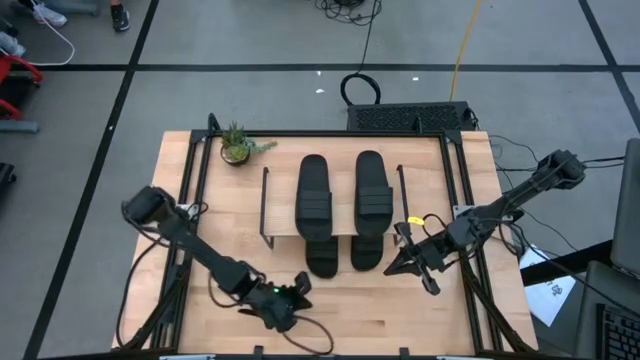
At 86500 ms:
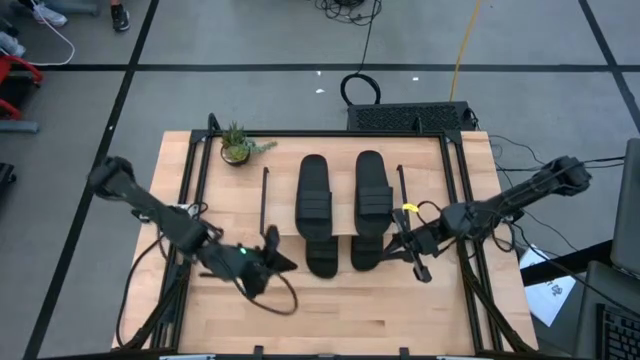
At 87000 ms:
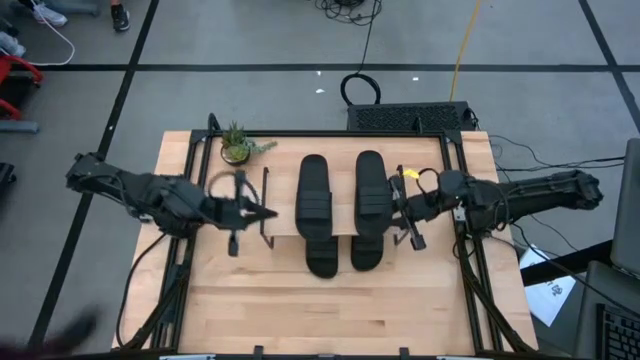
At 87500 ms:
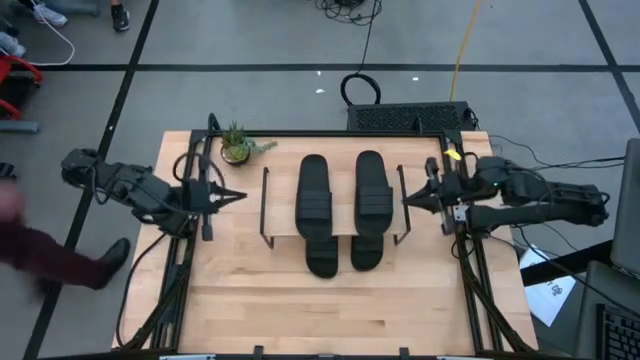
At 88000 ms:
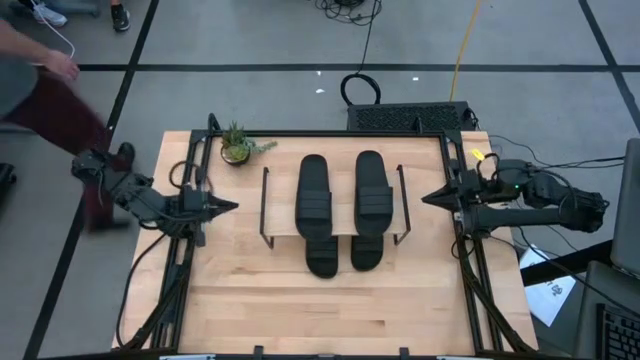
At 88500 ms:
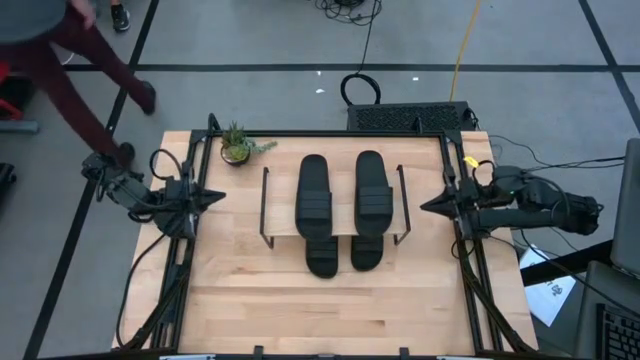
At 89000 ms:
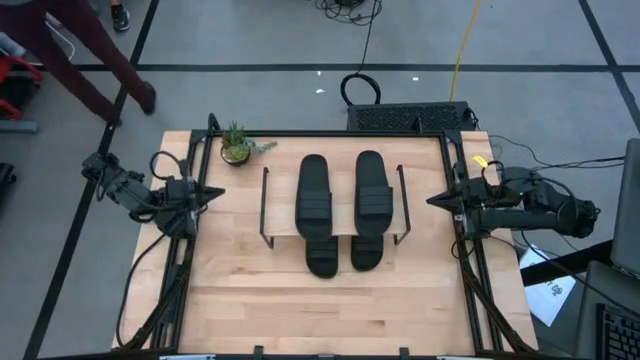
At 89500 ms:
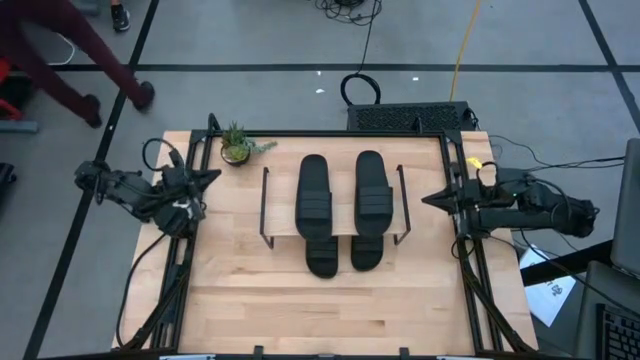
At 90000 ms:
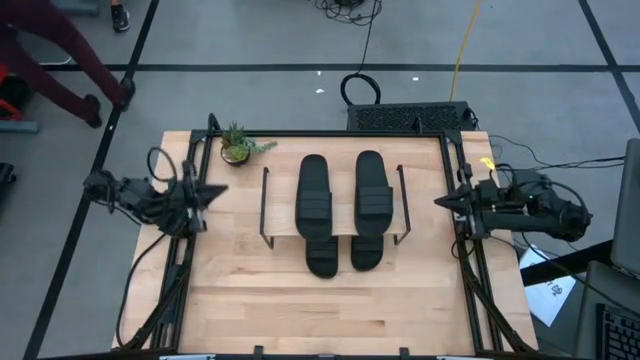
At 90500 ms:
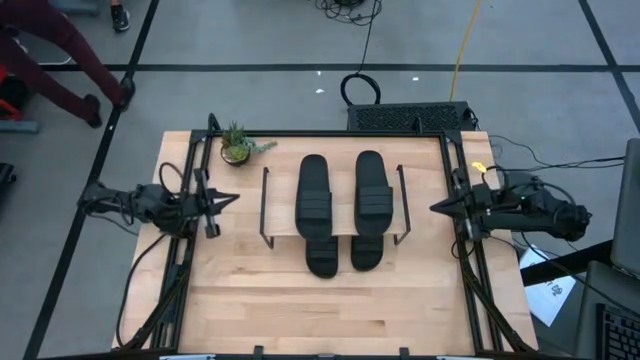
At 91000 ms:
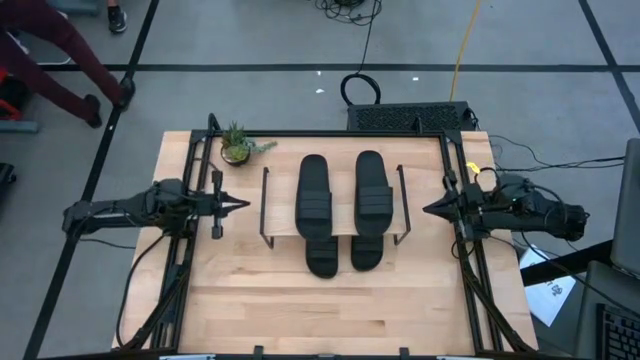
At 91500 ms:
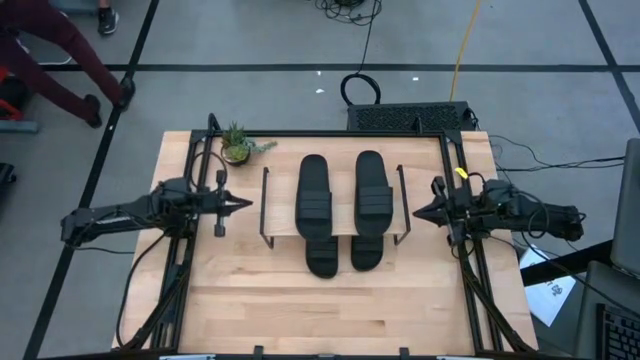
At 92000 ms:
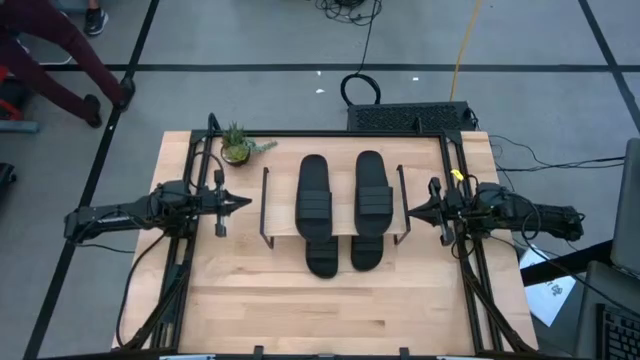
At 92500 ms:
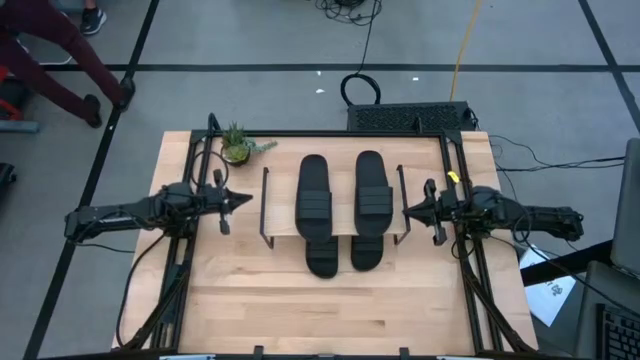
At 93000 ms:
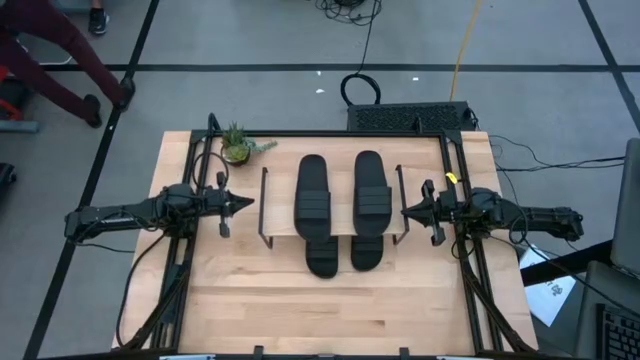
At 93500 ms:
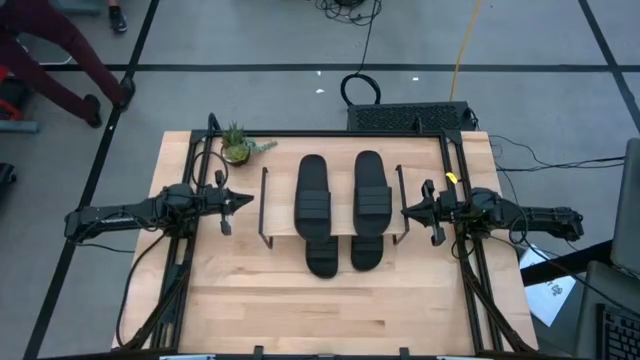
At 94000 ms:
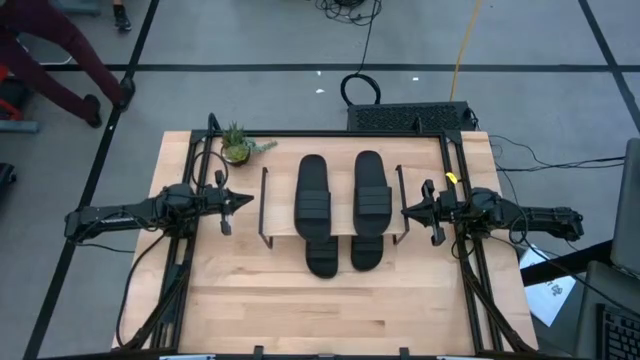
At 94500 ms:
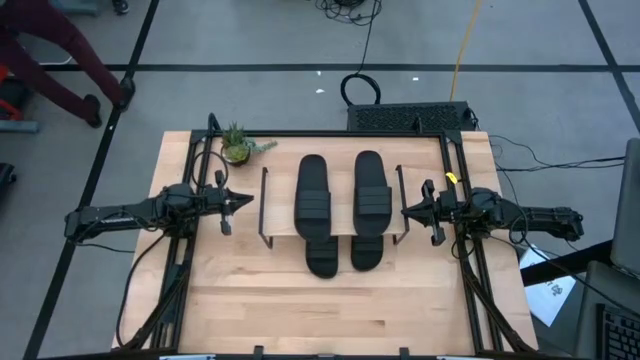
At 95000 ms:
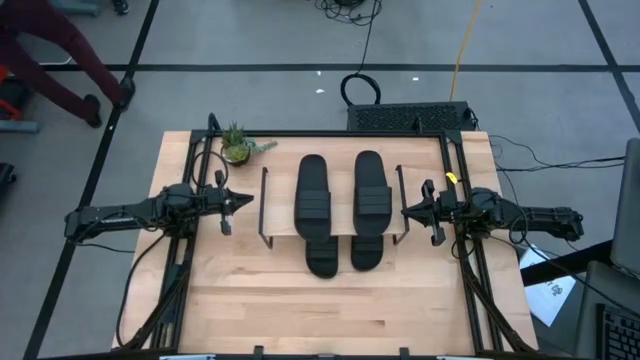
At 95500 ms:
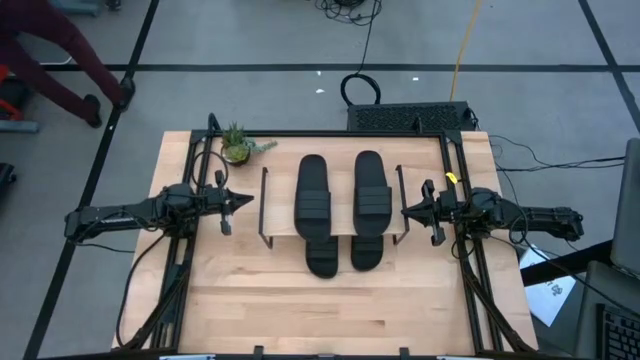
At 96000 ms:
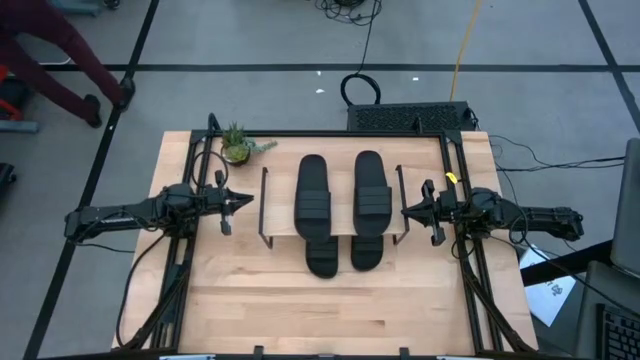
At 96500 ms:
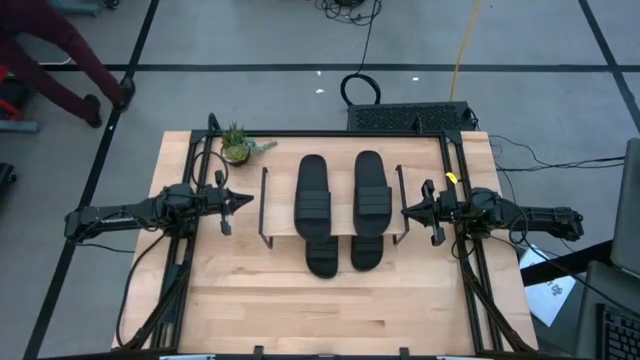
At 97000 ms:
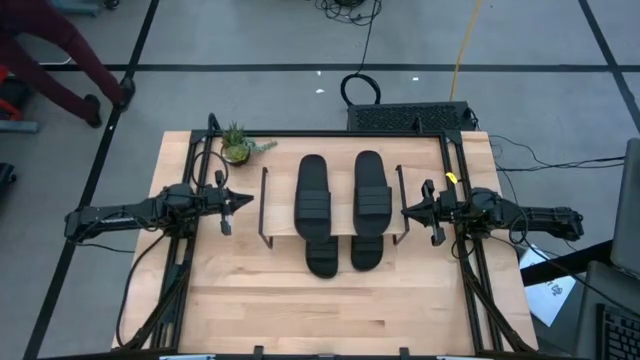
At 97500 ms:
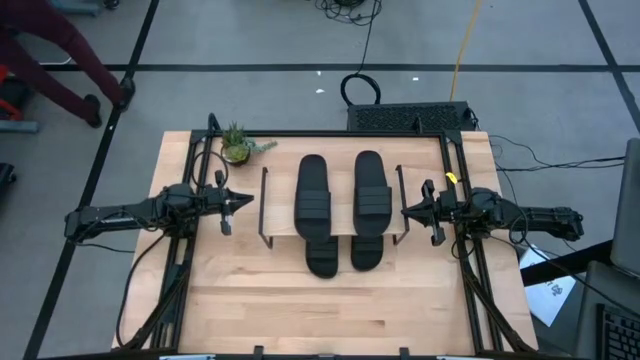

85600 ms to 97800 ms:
Task: Pick and place slides into the shelf
Return to Home Position
